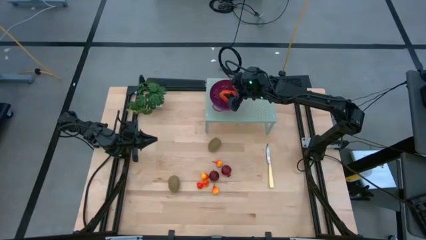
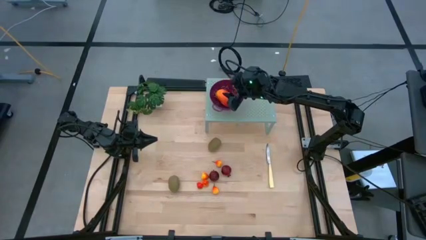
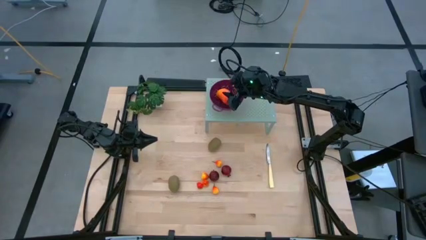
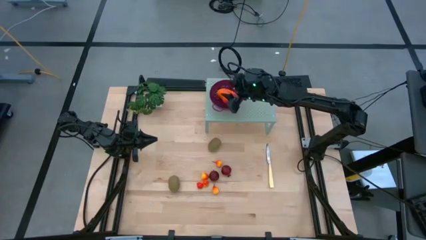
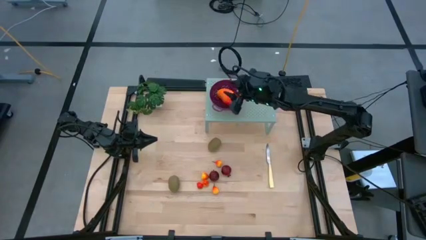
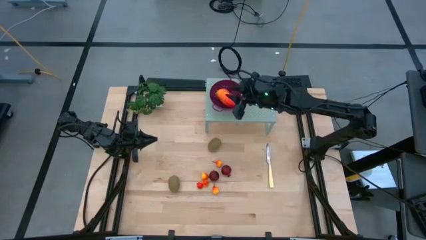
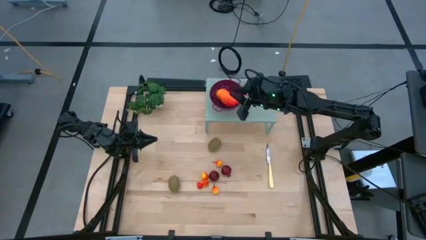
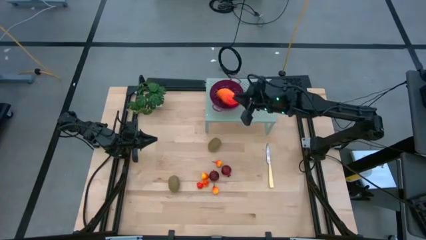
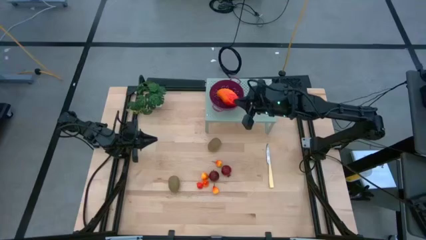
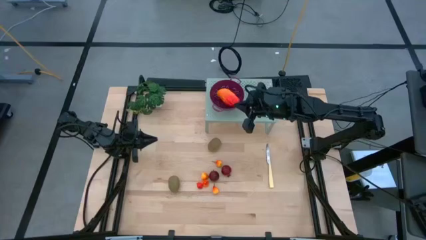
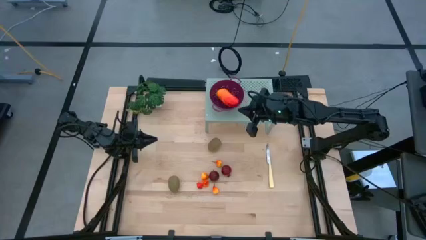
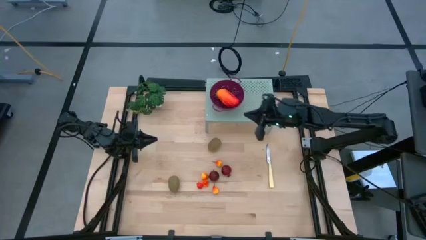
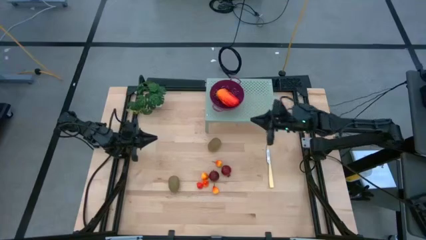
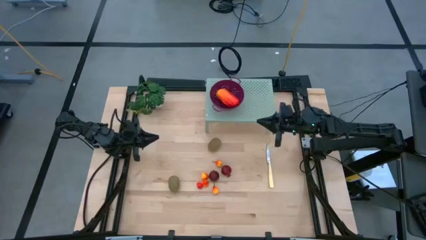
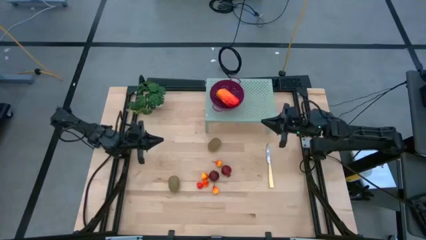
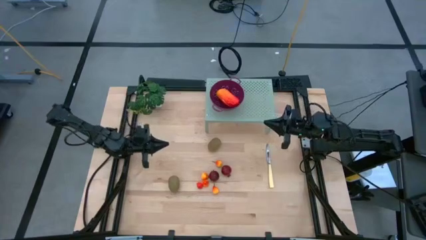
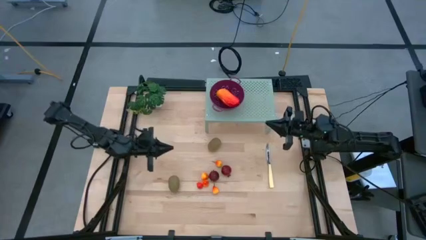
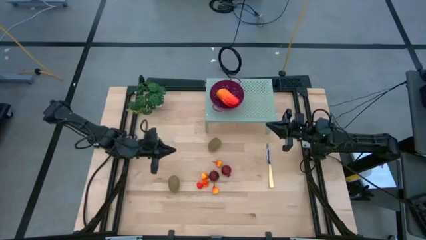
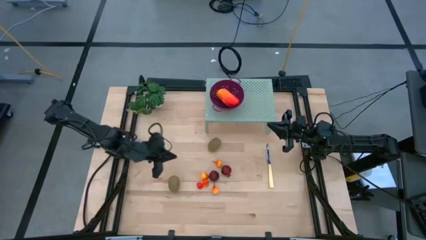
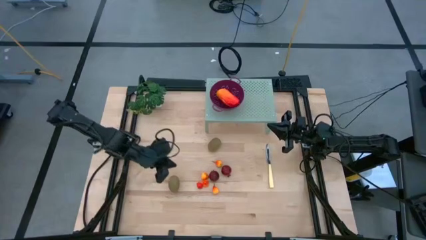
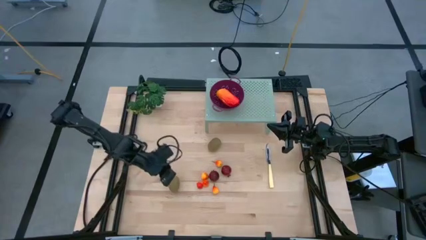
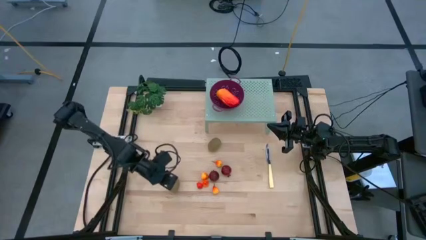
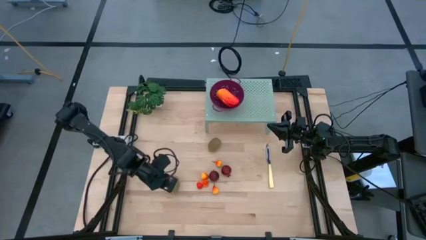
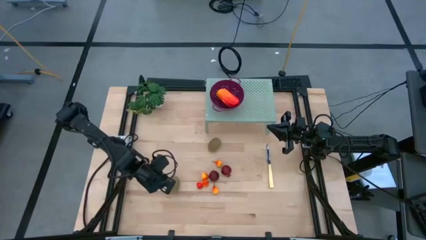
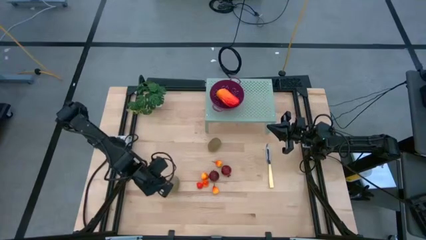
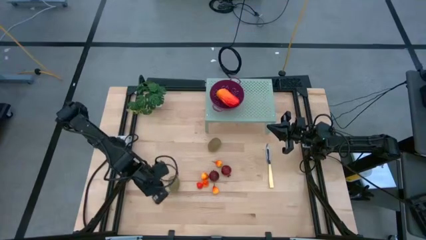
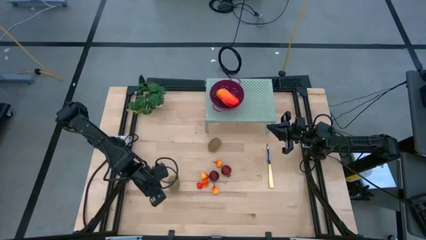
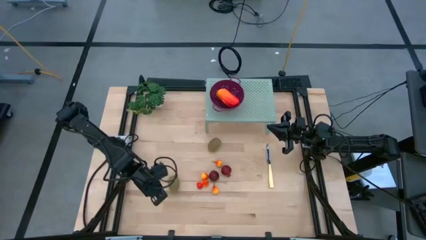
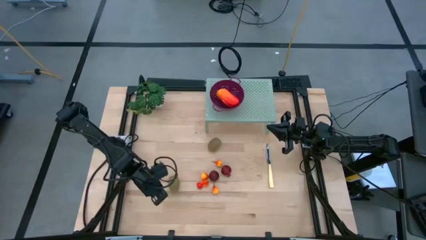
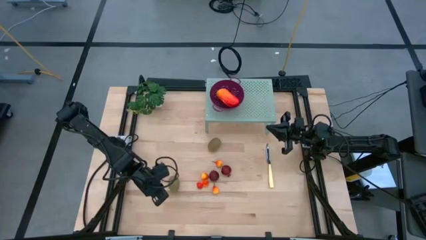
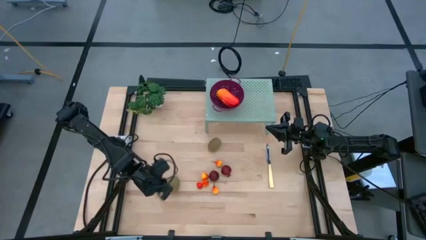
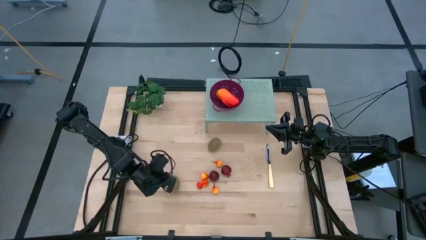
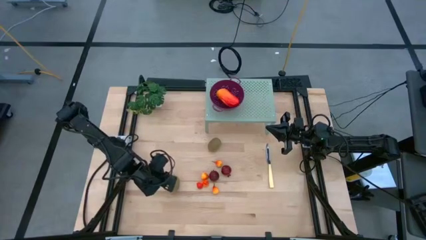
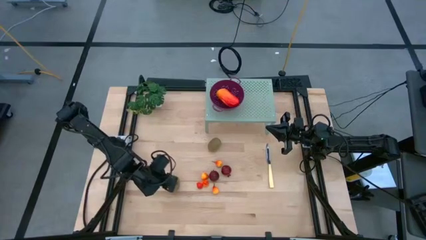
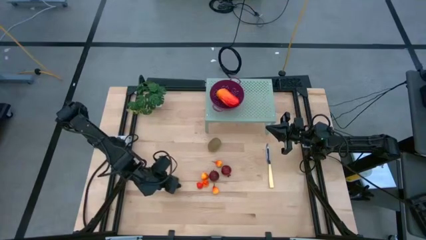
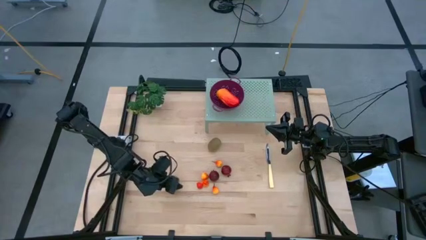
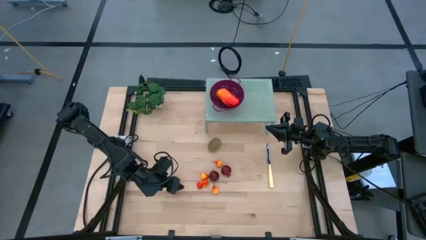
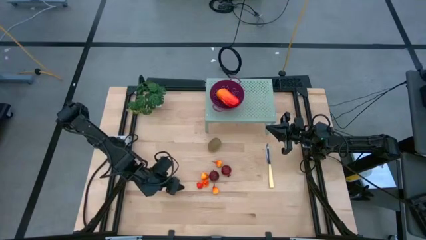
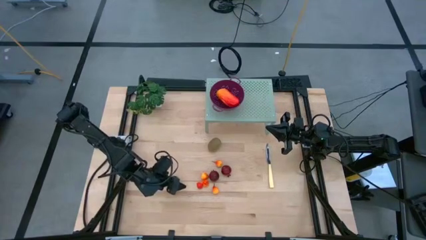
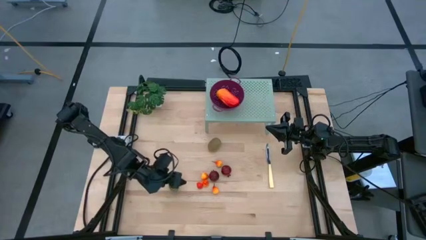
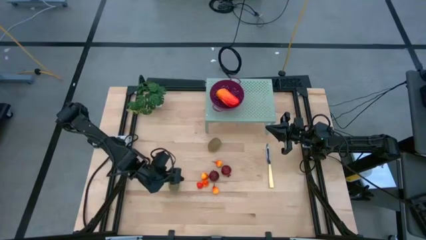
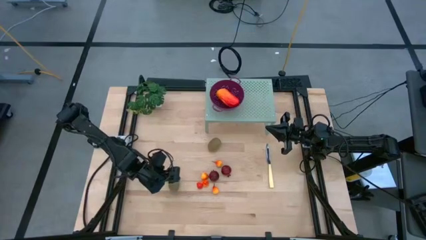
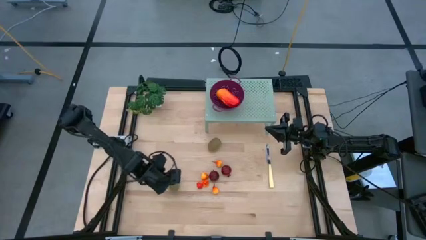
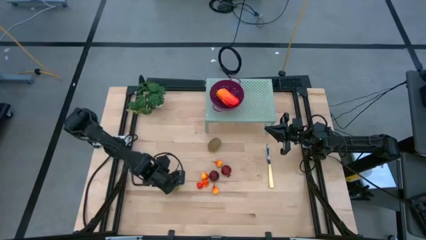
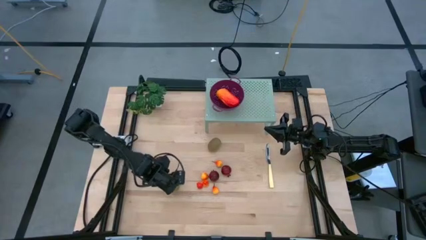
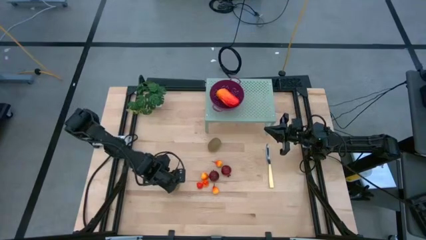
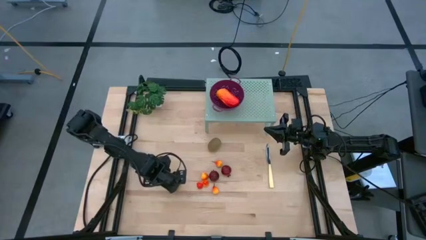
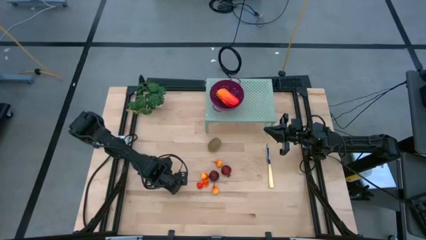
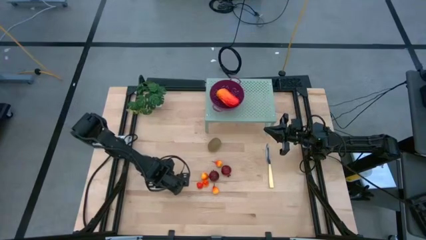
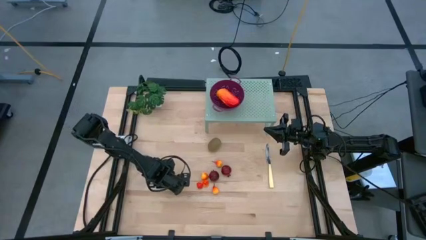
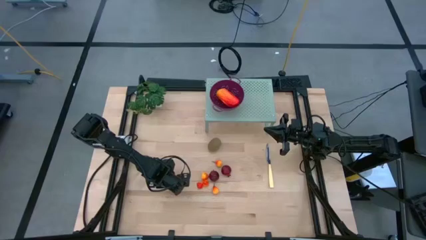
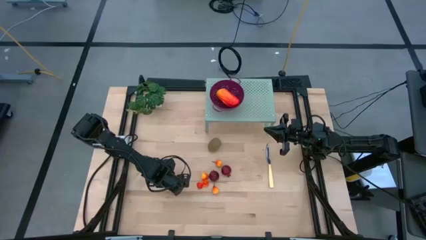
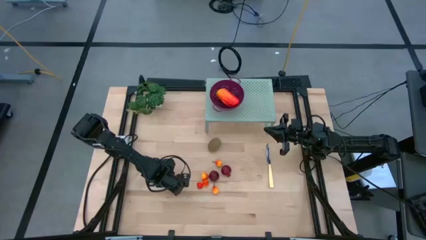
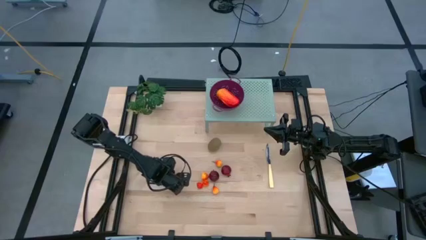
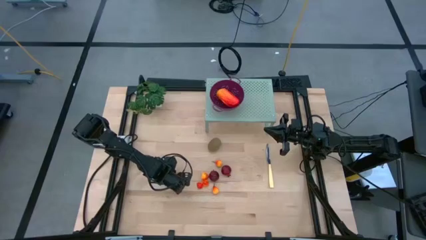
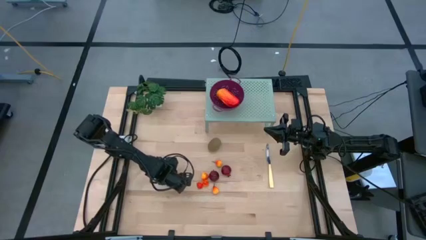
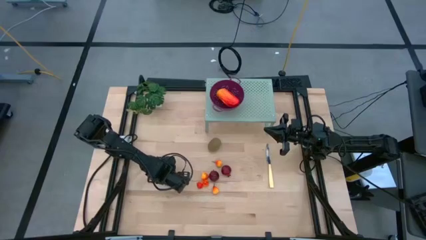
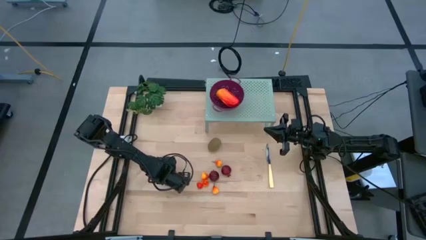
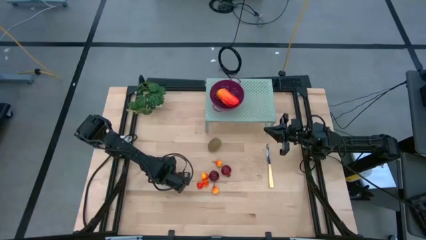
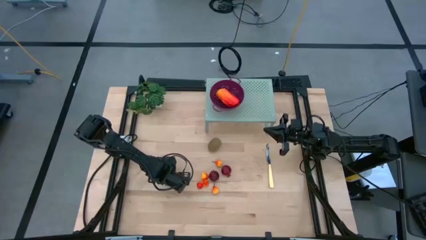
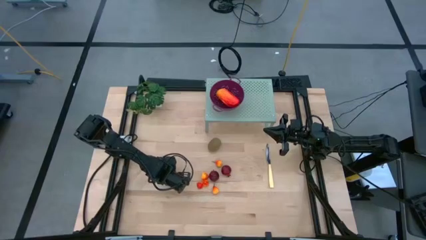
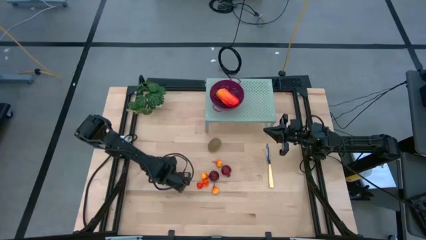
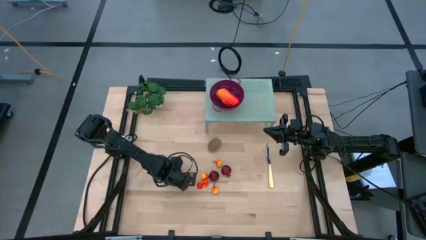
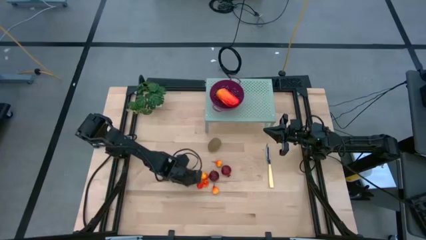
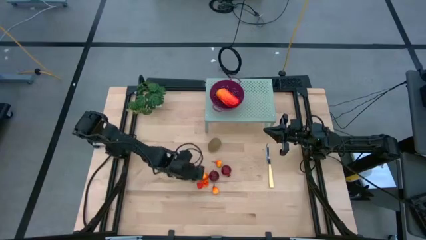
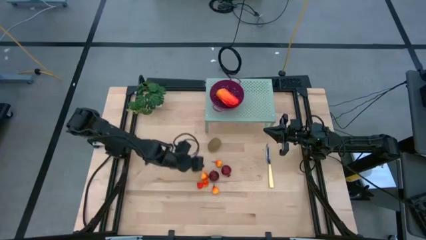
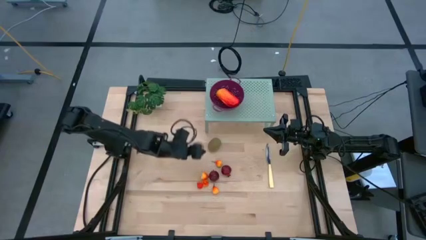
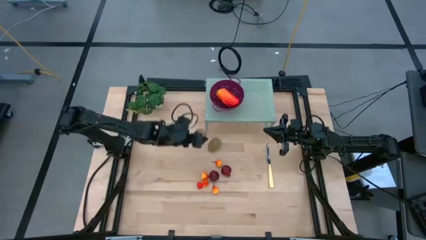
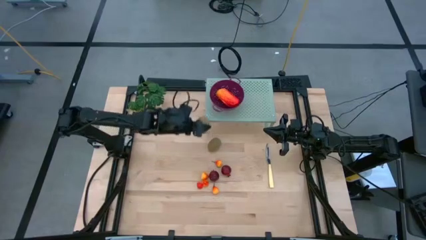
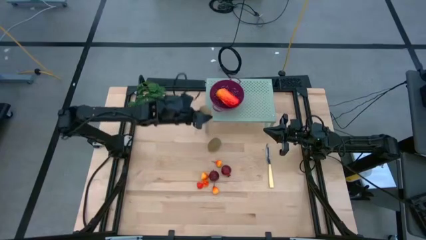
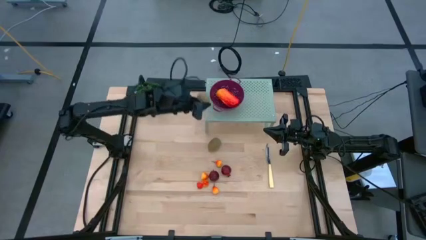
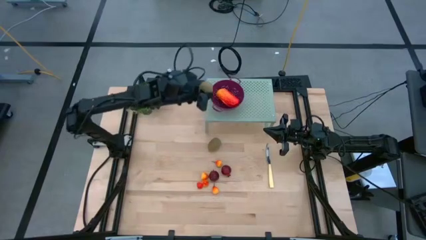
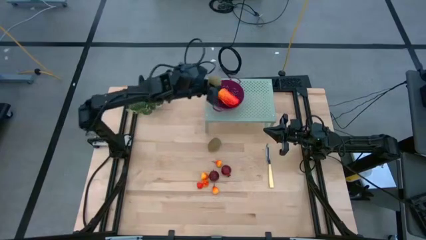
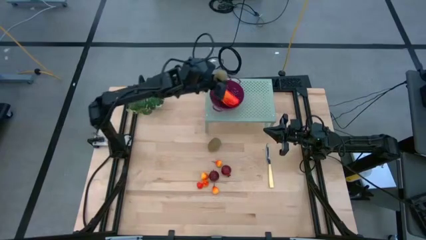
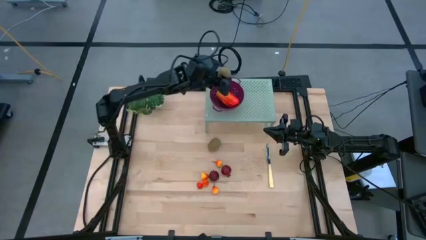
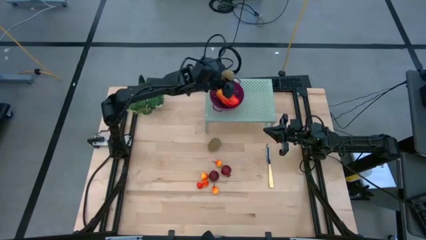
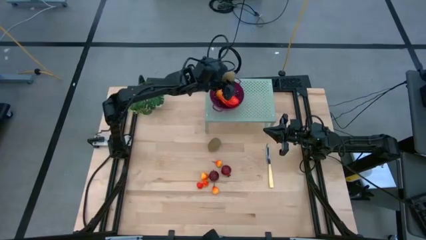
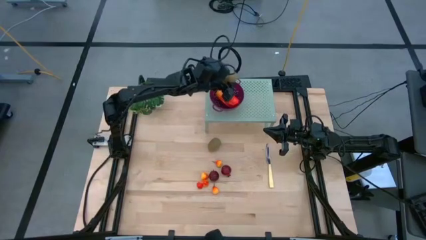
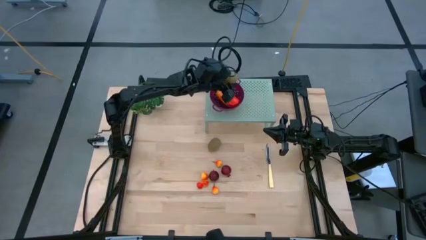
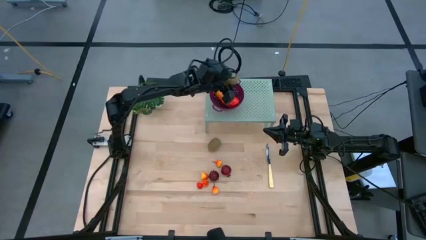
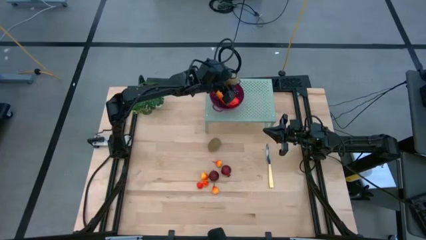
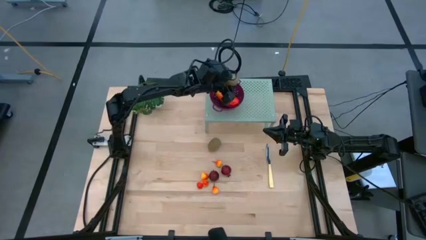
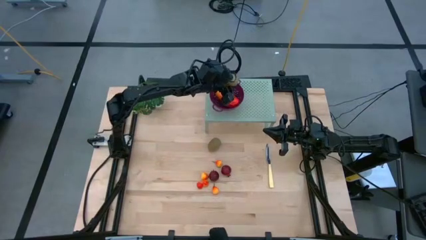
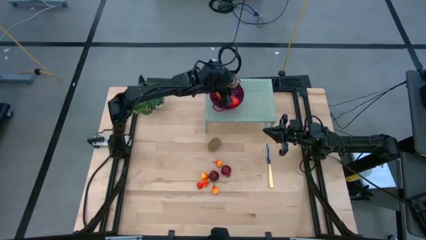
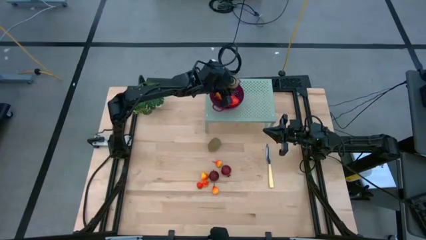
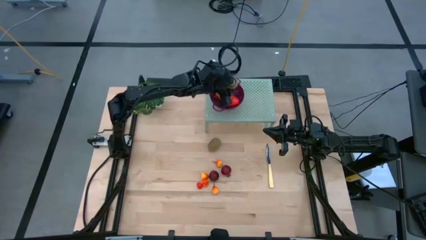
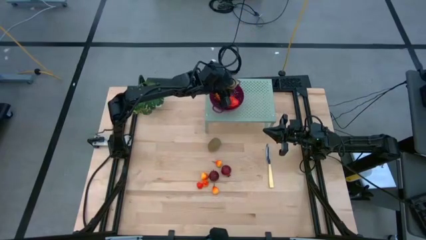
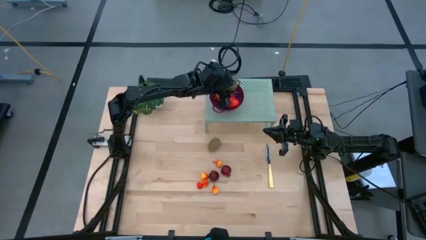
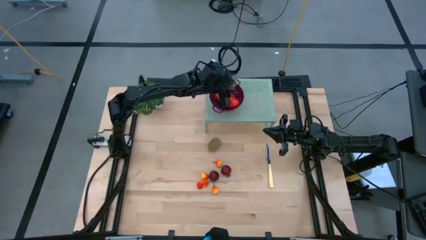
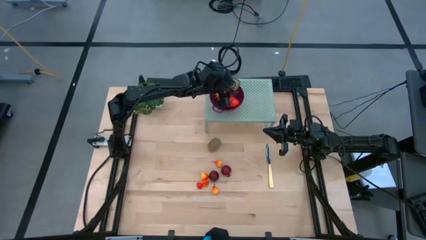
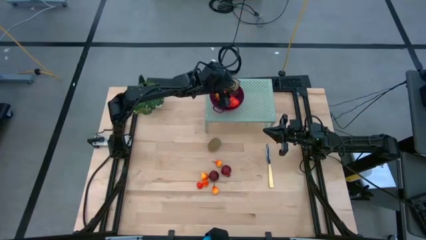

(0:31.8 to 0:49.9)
Task: Pick & Place Fruit
Put the kiwi into the dark red colander on the shelf
